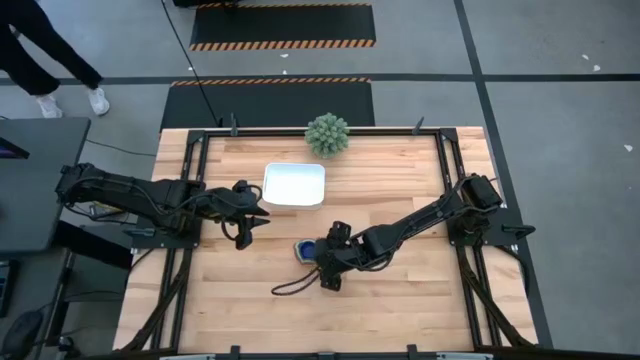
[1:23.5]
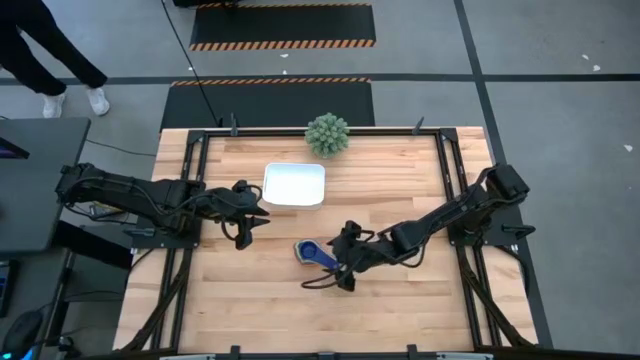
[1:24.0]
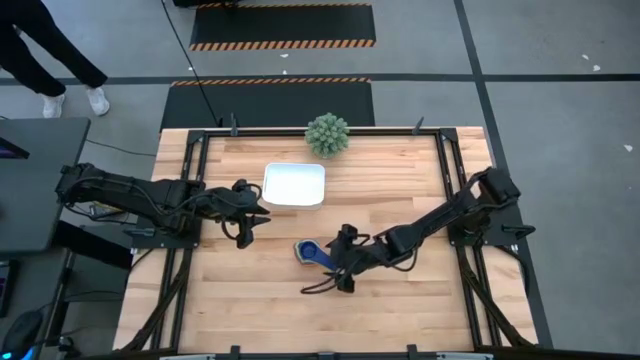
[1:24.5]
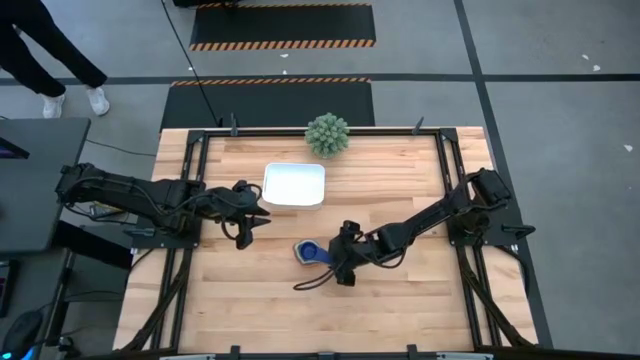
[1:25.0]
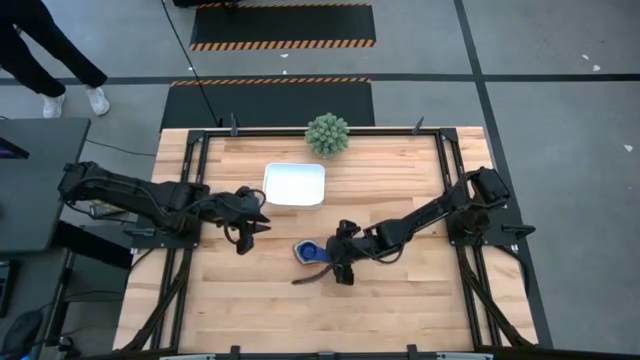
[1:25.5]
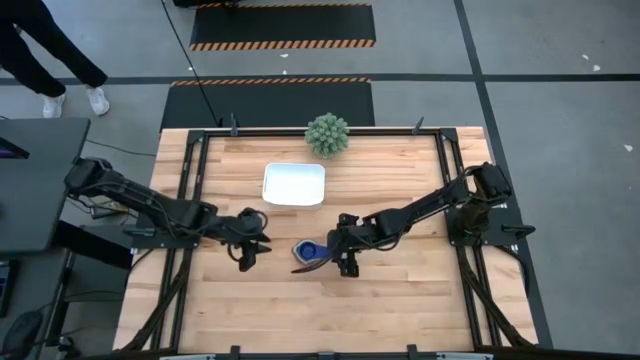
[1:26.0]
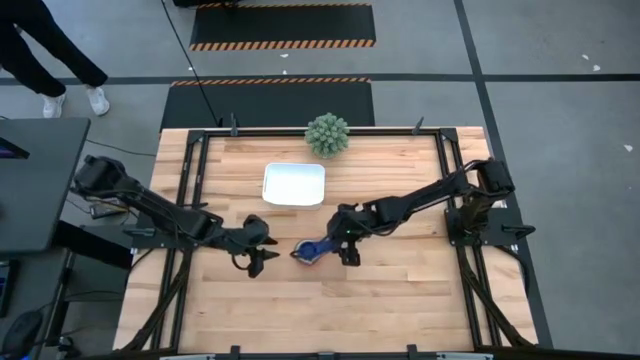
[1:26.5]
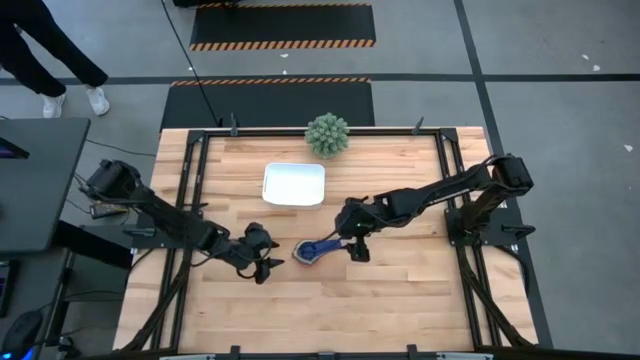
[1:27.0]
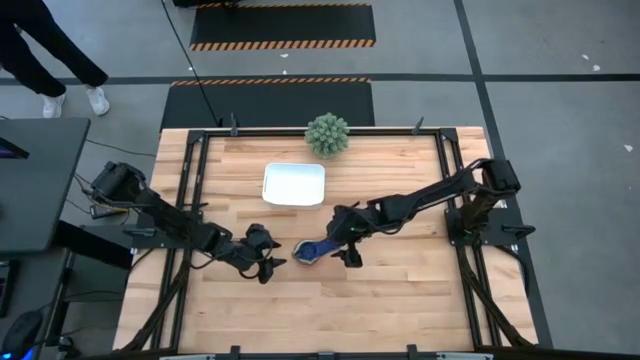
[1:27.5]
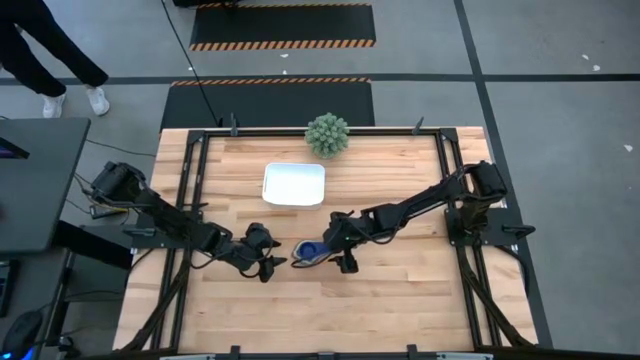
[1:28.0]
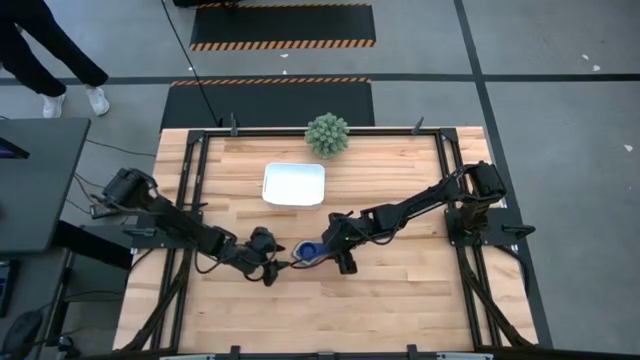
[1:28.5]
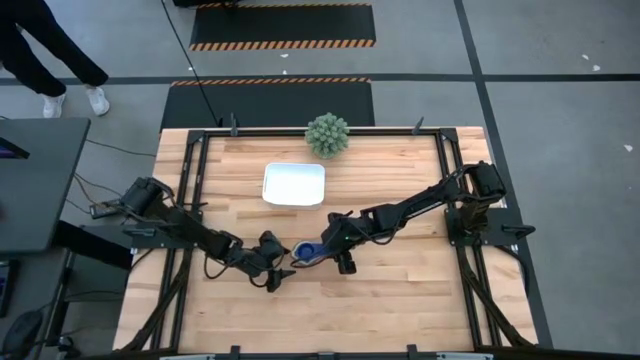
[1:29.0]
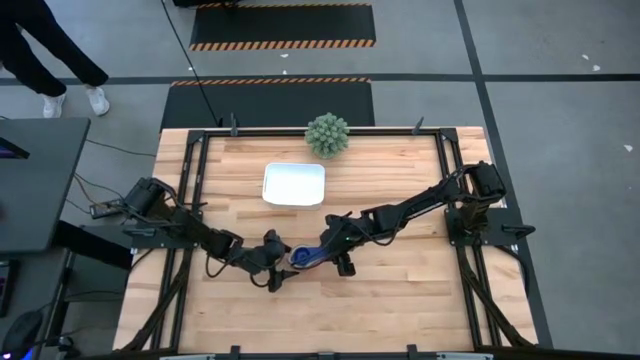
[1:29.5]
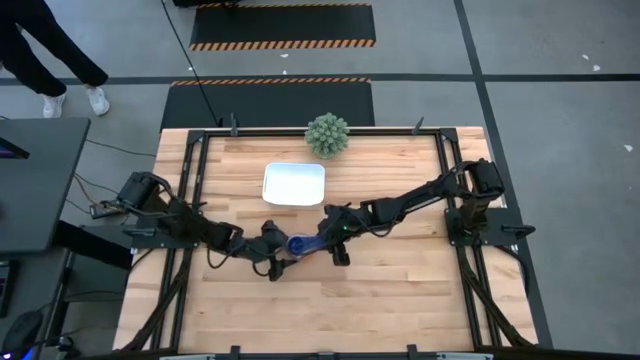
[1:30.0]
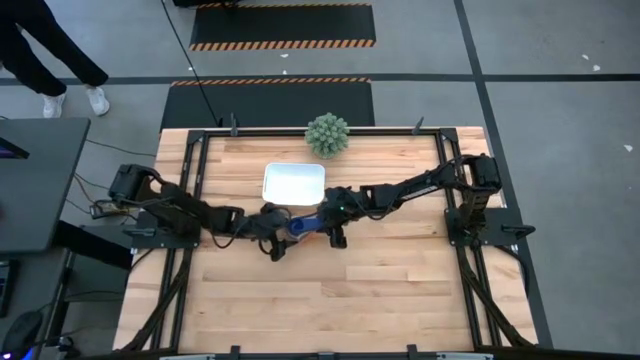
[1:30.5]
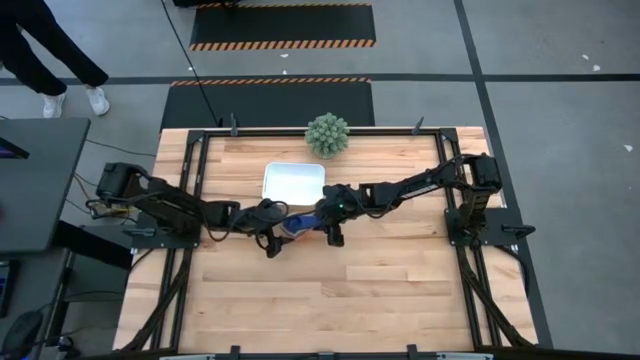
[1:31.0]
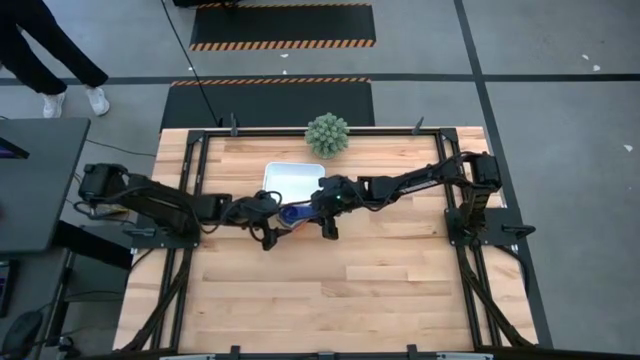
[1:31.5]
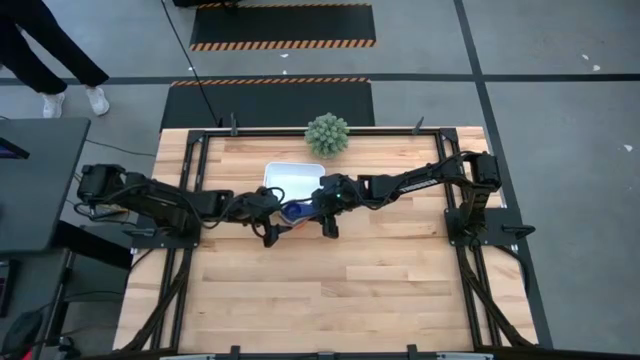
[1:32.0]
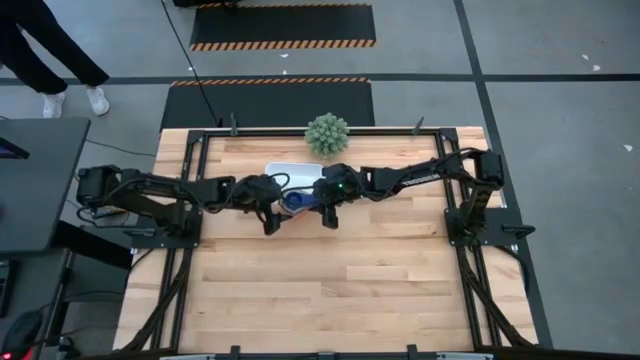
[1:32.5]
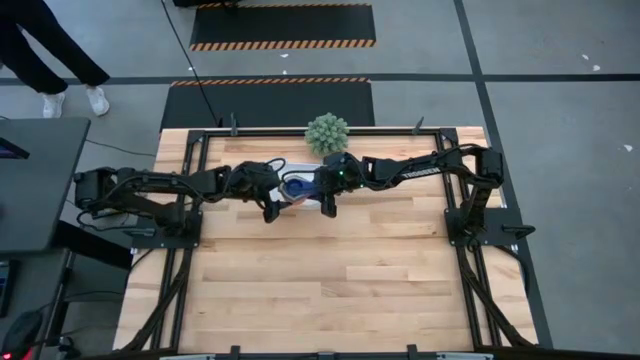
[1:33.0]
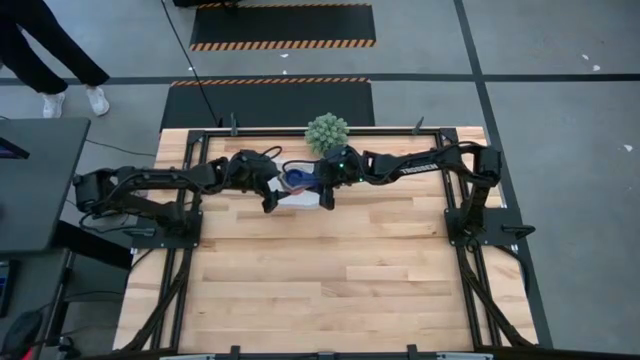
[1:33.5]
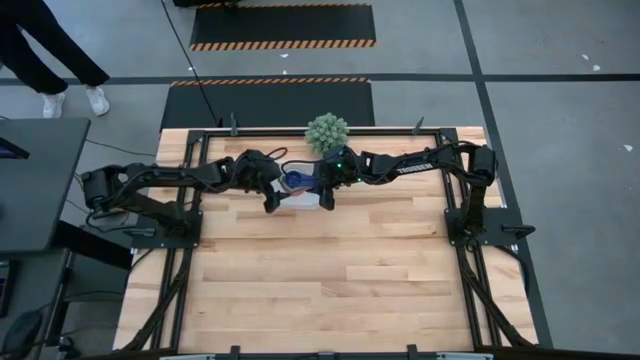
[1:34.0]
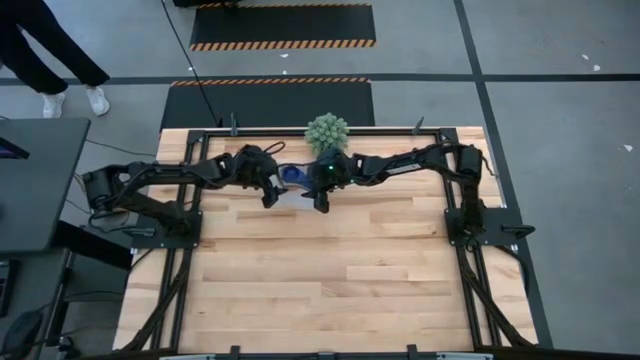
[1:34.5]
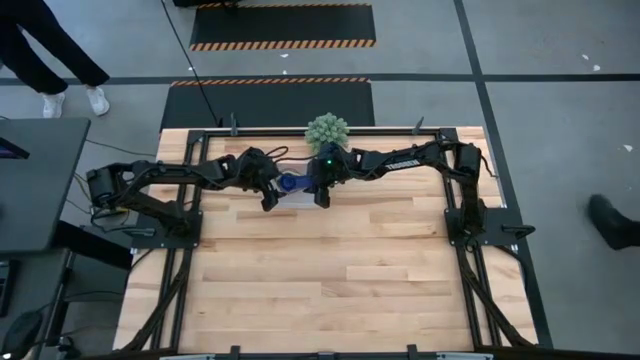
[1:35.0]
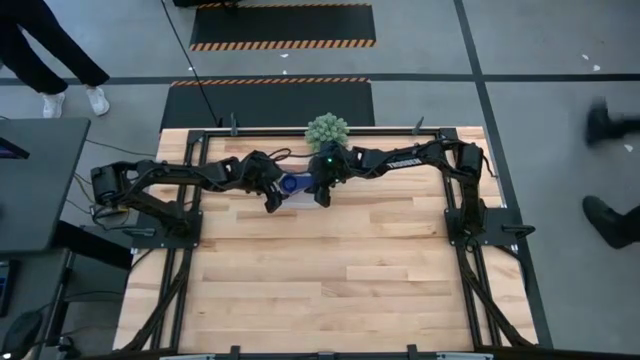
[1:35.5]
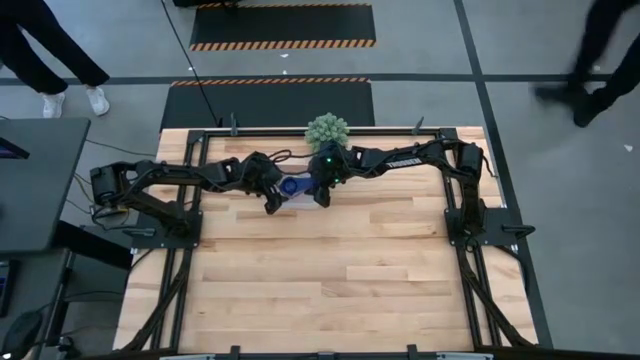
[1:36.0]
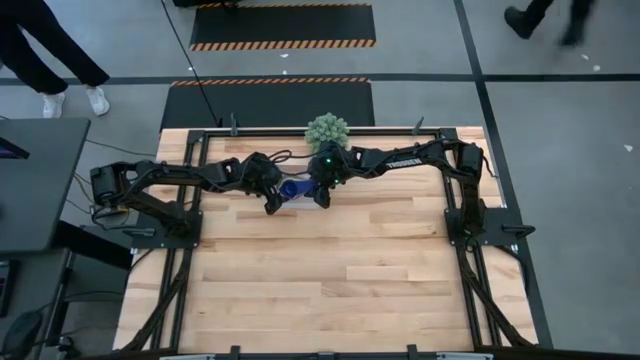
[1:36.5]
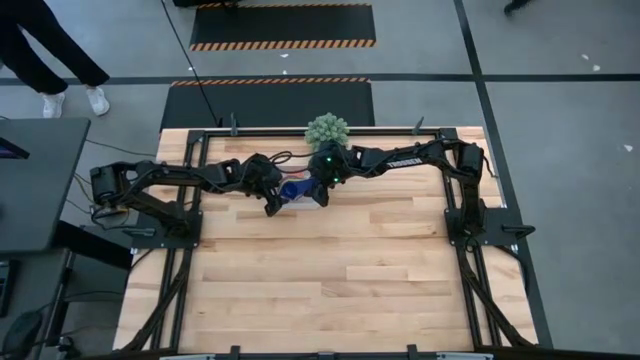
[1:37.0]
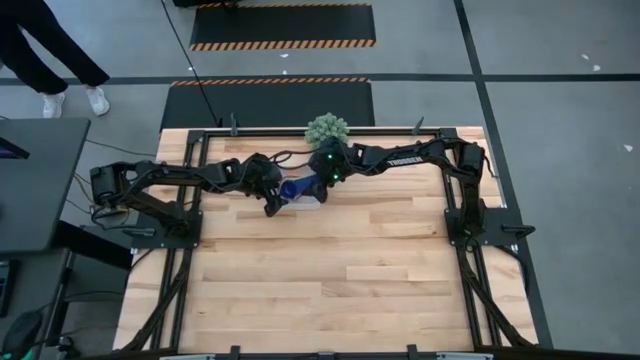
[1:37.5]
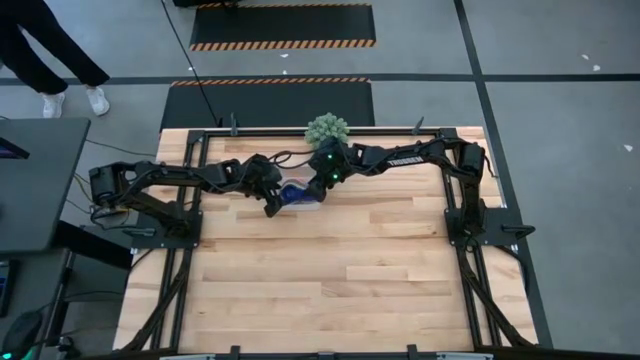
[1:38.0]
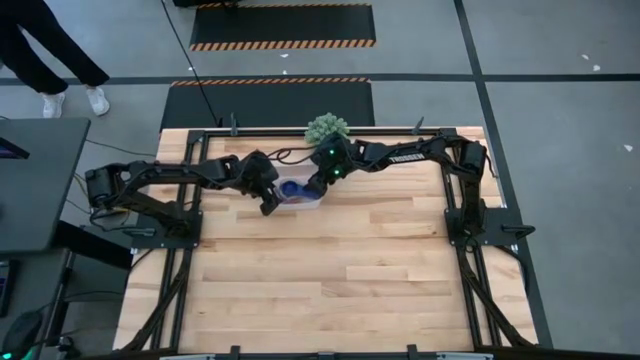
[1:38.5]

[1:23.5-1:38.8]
Task: Nest measuring cups in basket
Put the stacked measuring cups into the white bin

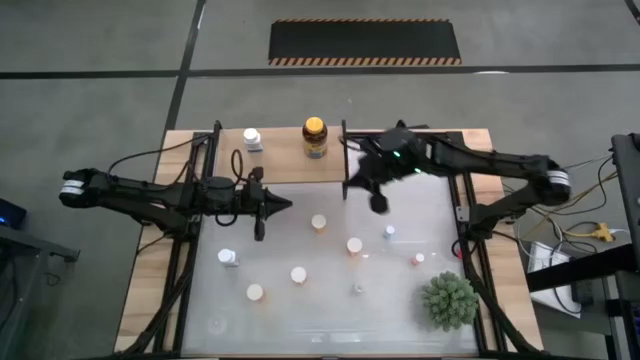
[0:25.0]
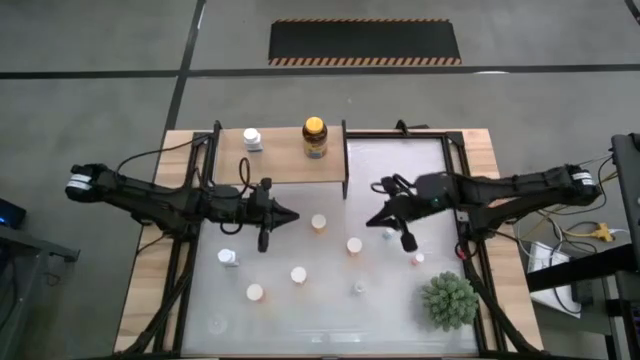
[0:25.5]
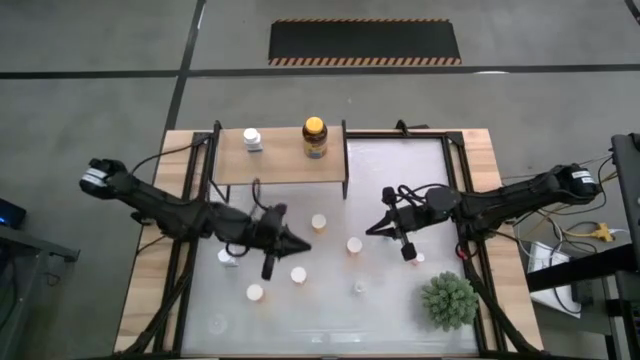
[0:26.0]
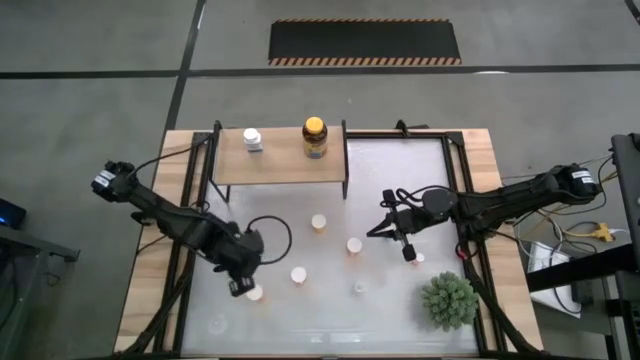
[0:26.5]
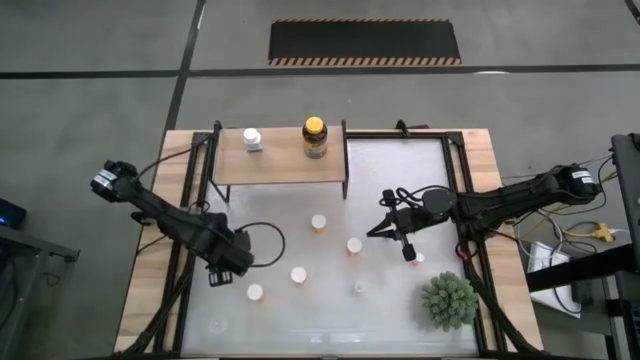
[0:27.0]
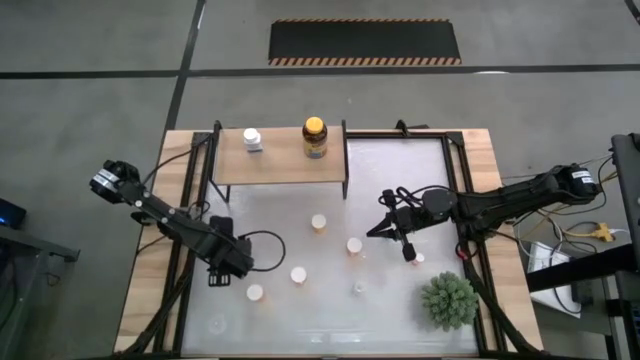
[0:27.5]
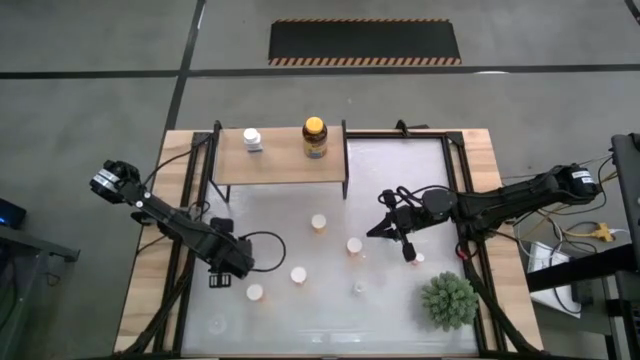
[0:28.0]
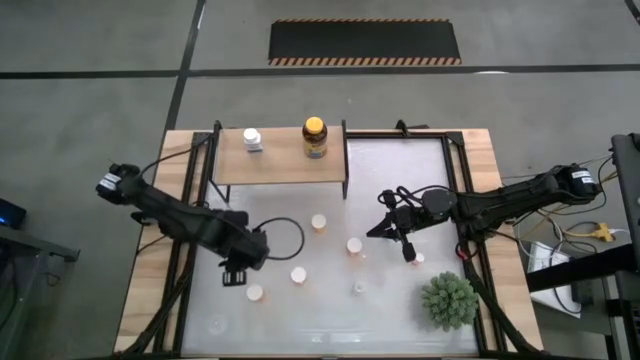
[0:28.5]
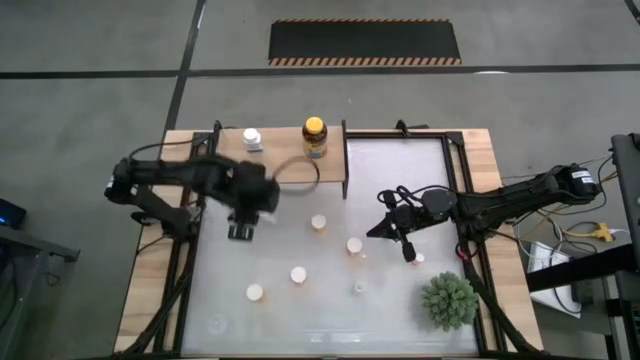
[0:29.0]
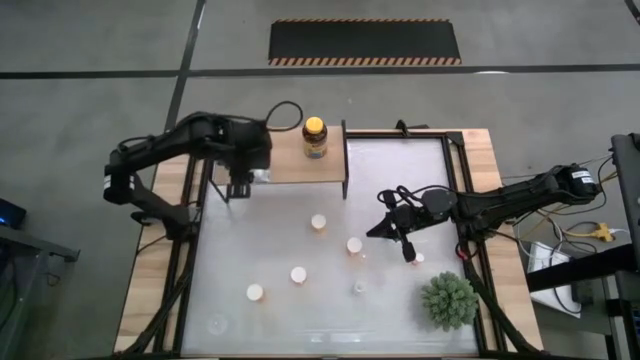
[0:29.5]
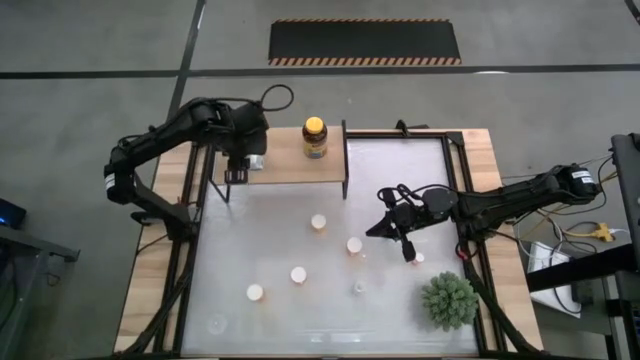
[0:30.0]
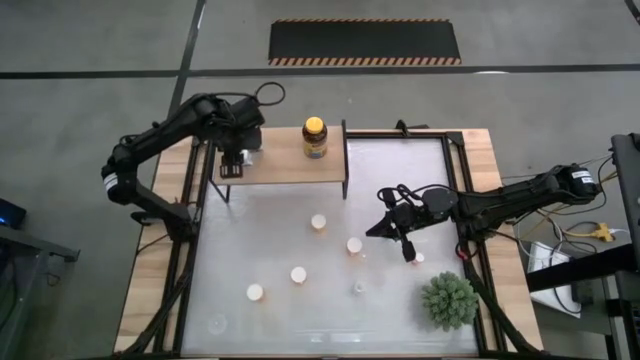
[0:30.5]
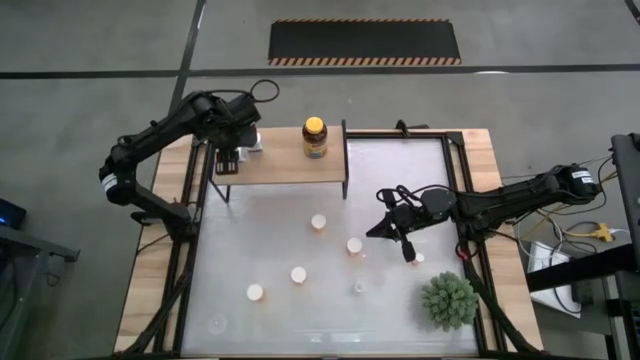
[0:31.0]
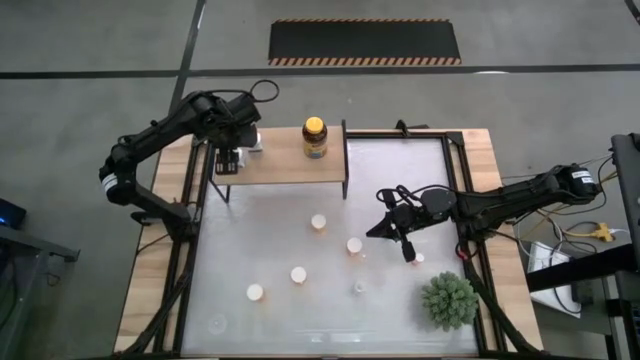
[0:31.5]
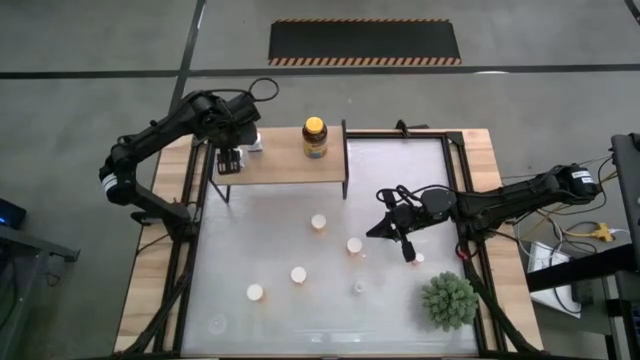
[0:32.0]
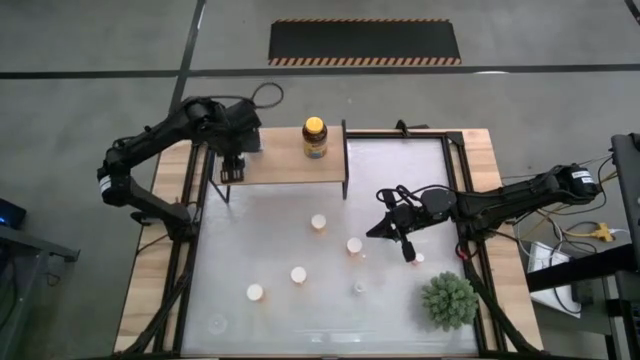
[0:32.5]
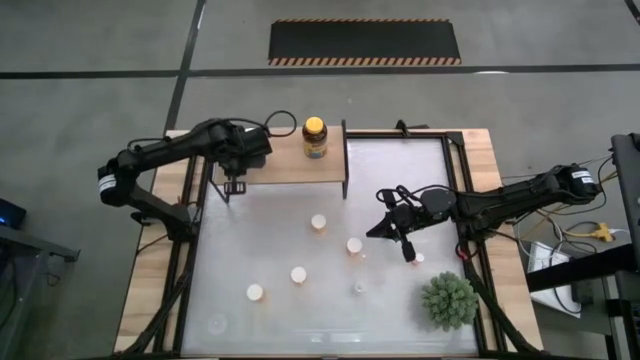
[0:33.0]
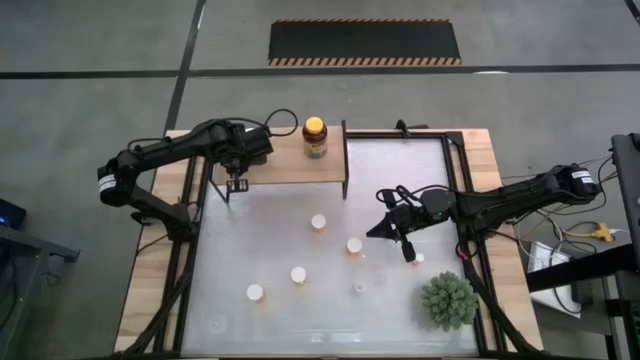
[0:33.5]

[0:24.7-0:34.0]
Task: Pick and place medicine bottles onto shelf by color
Put the white-blue medicine bottle on the shelf
